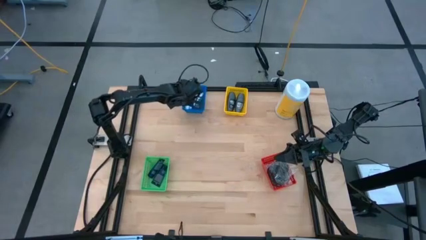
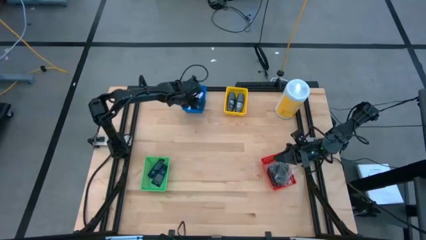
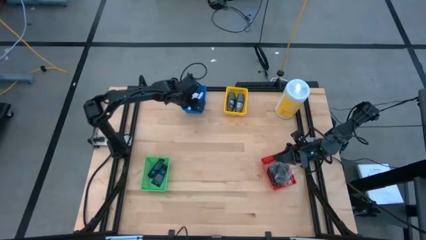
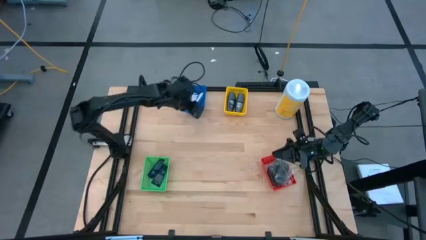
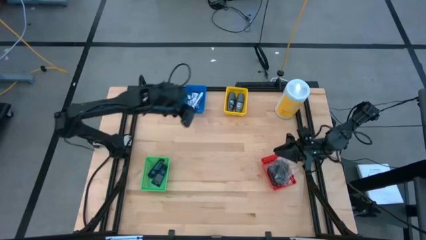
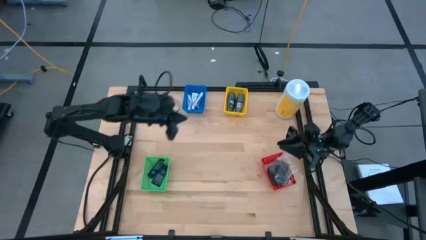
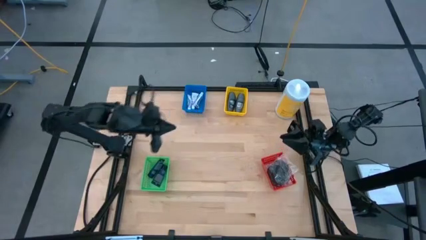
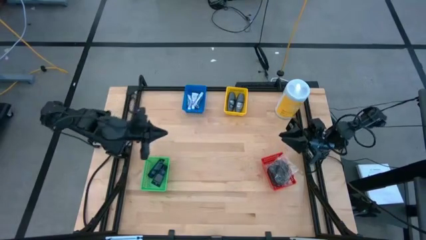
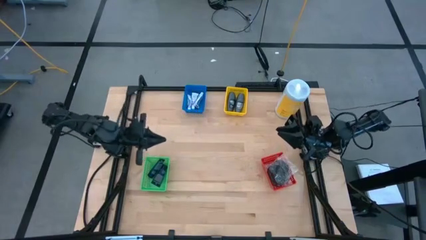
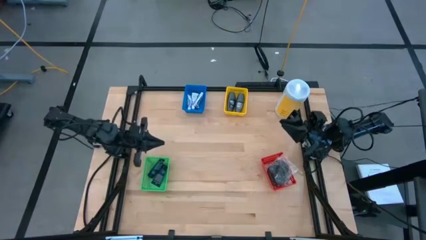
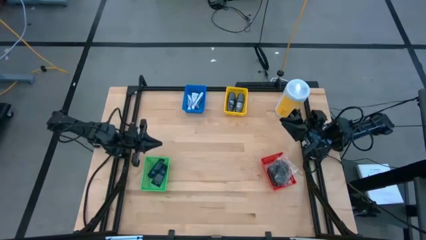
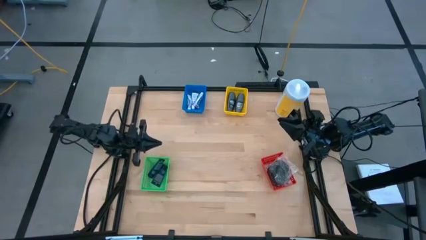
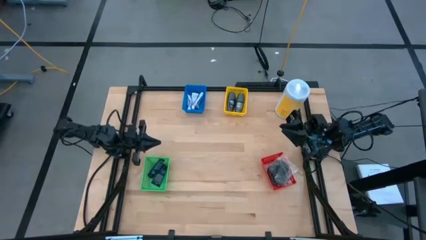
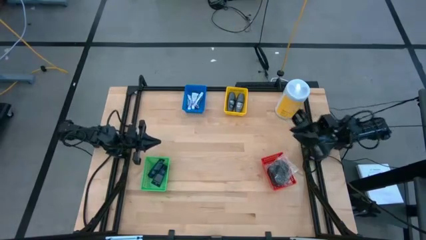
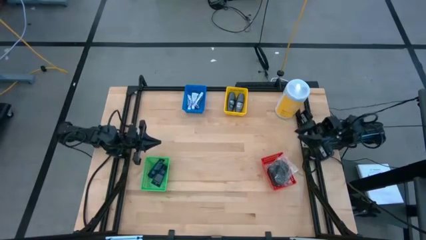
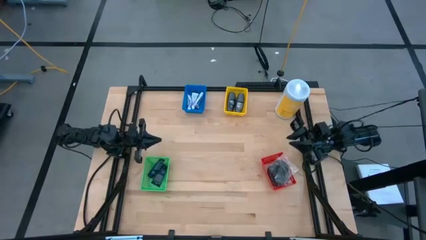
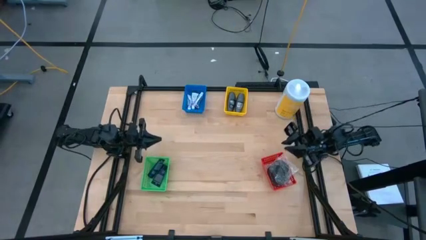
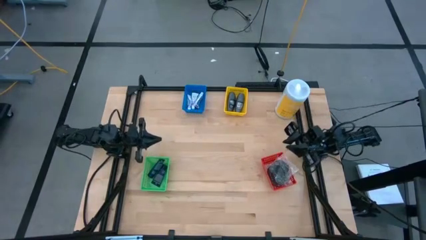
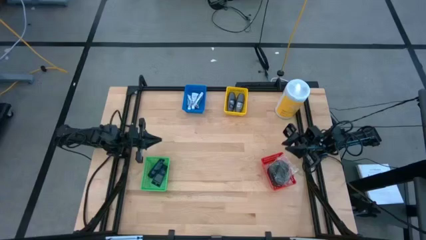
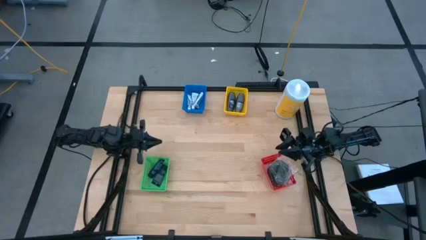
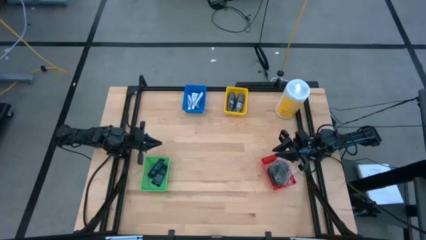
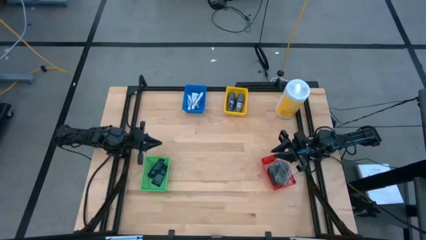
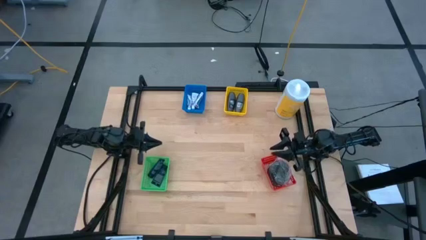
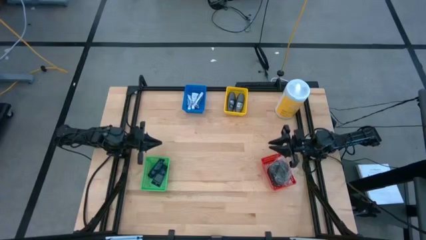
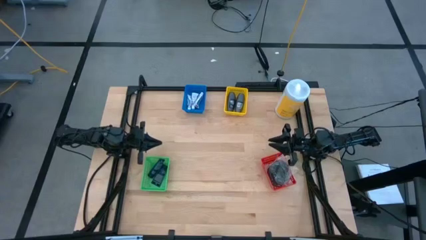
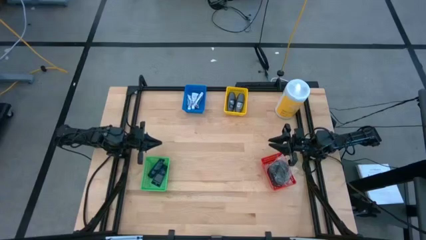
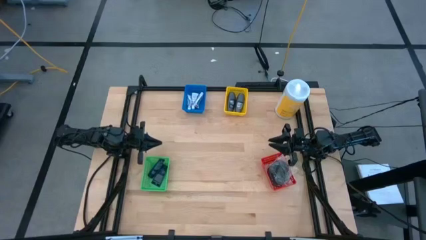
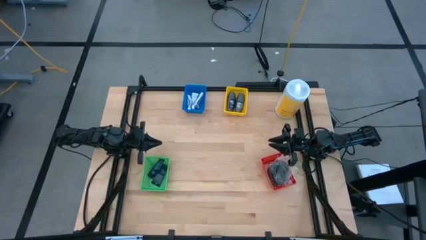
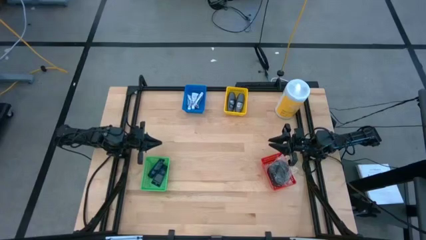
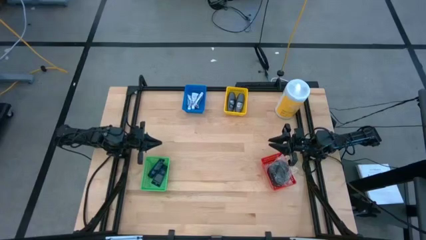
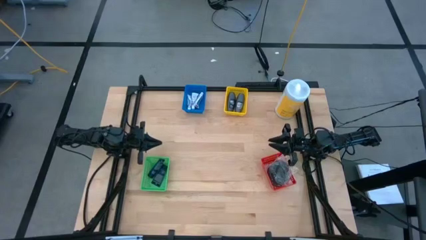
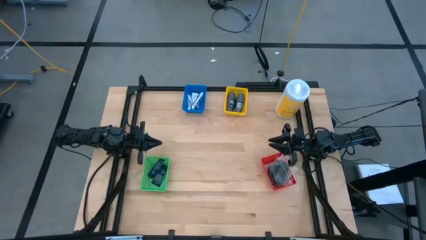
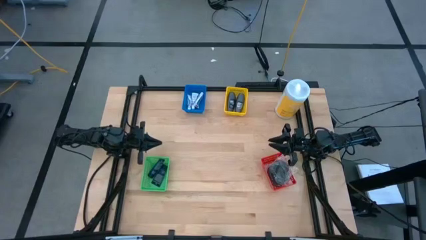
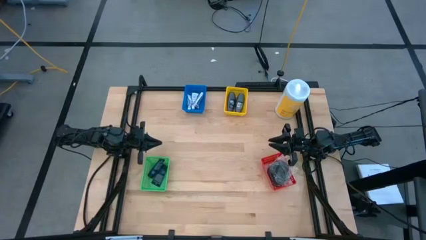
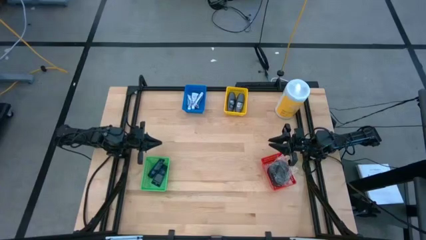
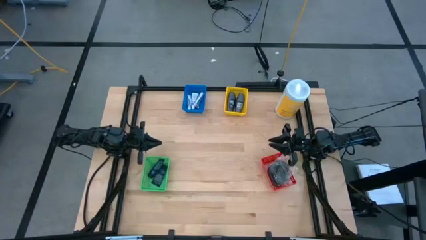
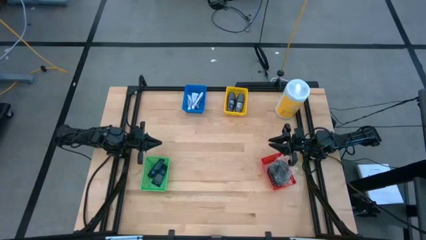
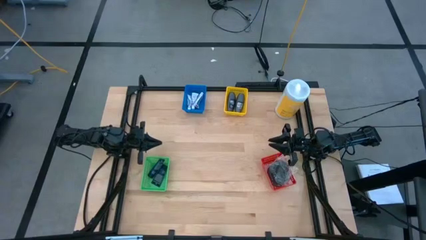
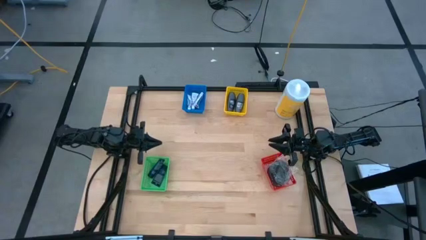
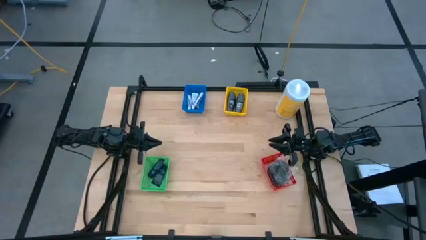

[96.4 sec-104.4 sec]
Task: Pick & Place Travel size toiletries
Return to Home Position

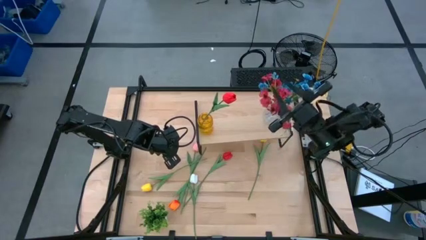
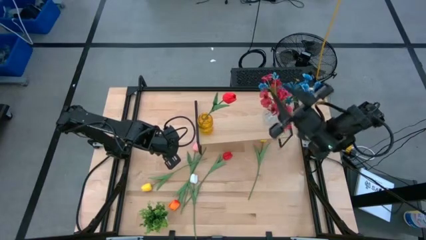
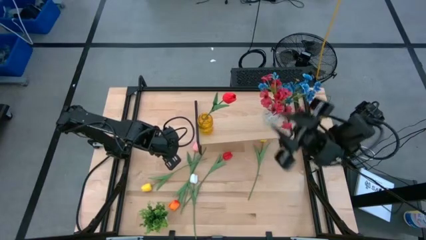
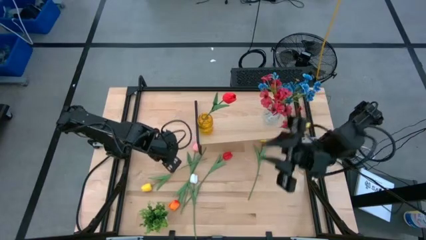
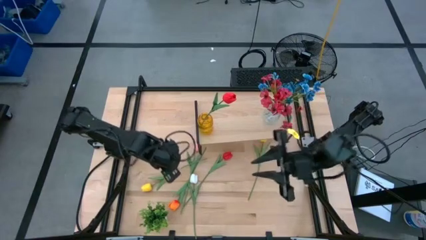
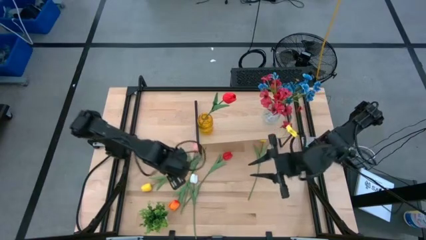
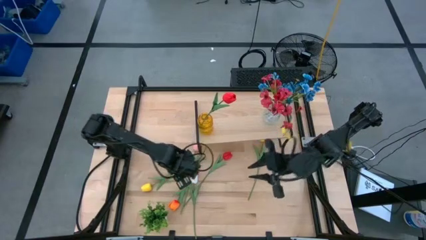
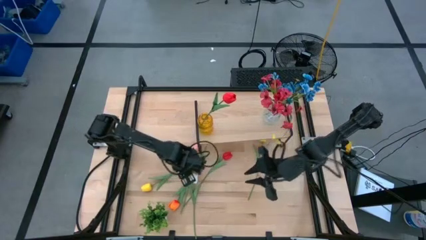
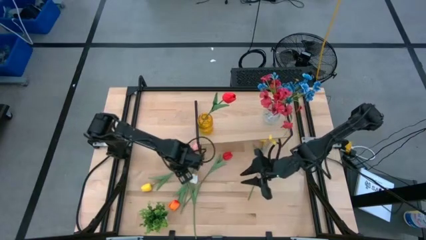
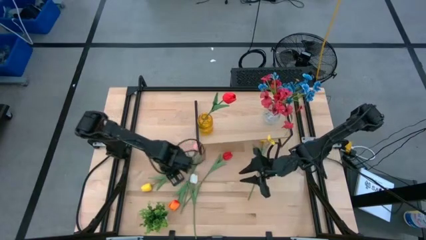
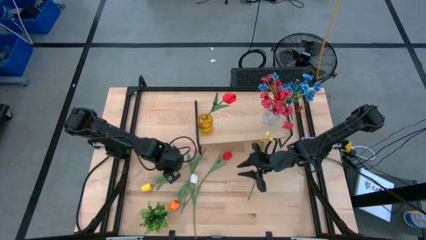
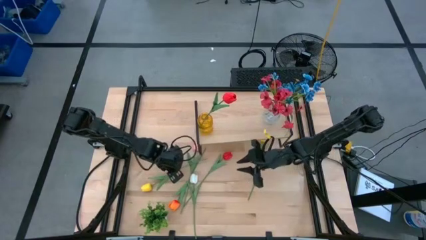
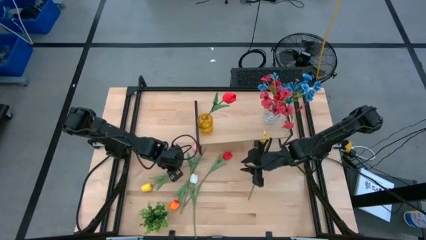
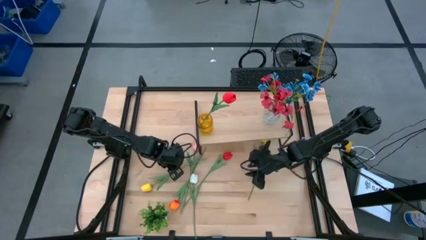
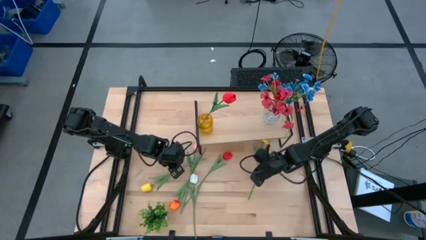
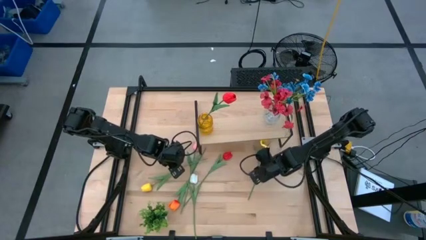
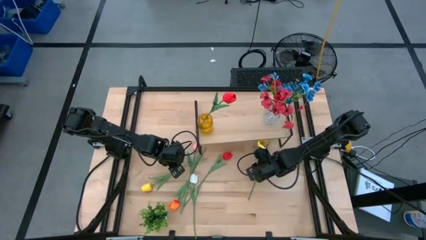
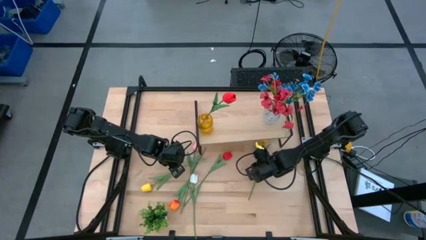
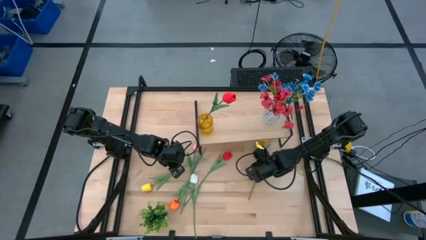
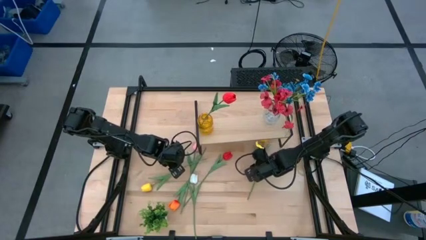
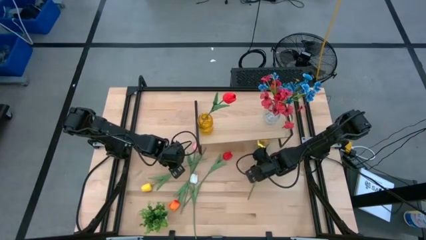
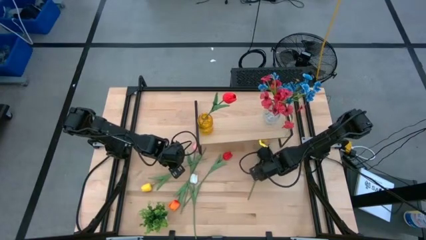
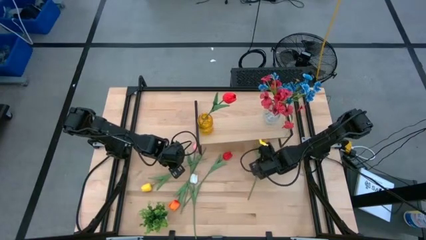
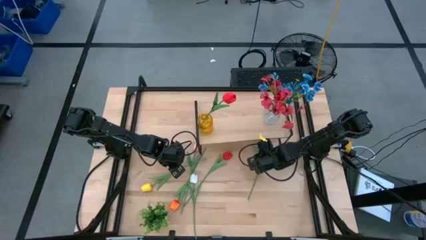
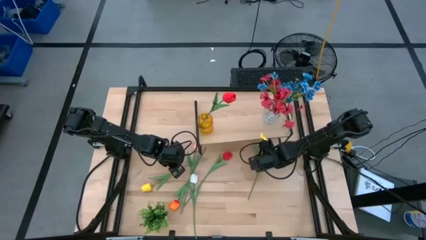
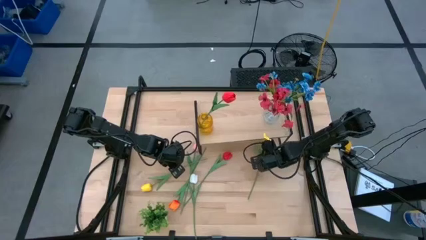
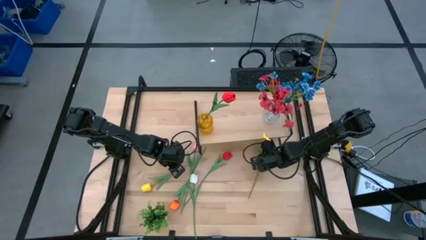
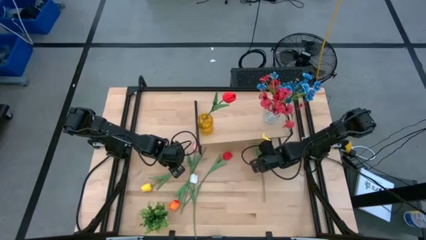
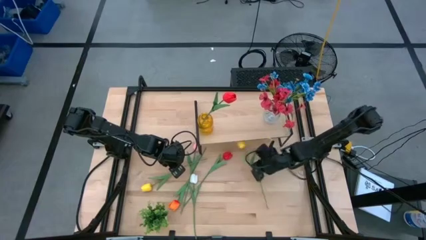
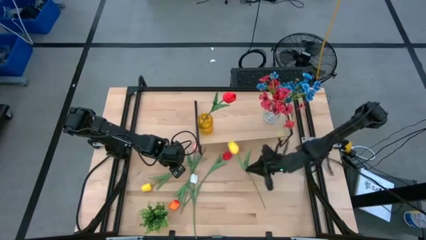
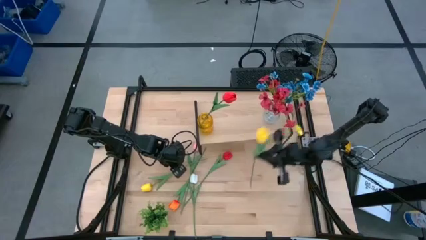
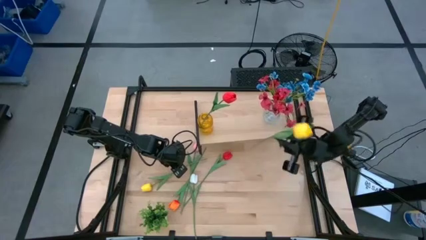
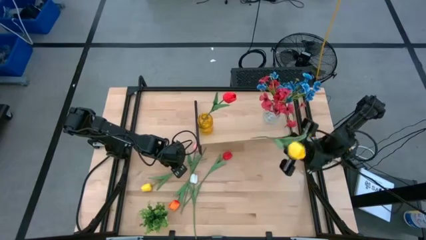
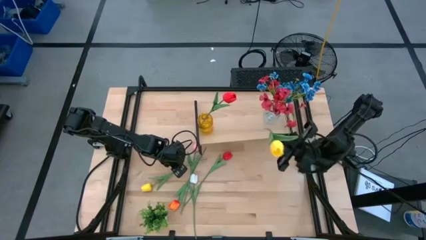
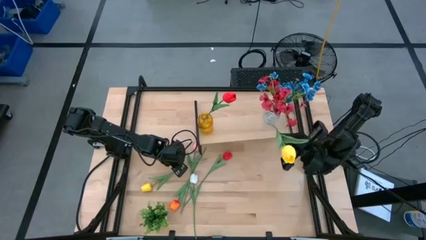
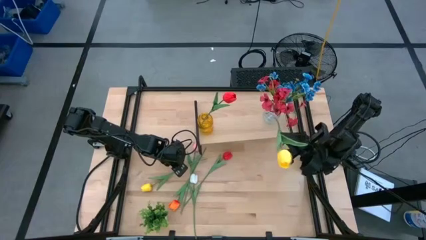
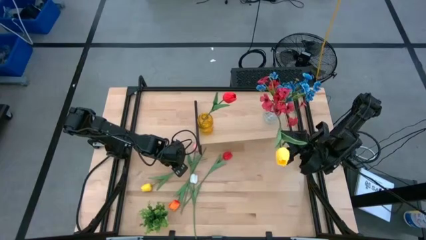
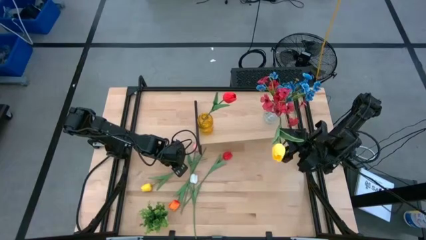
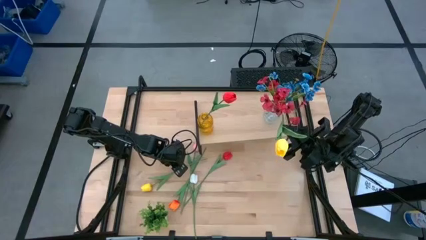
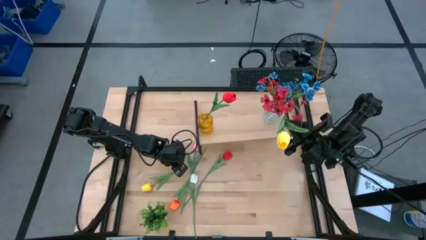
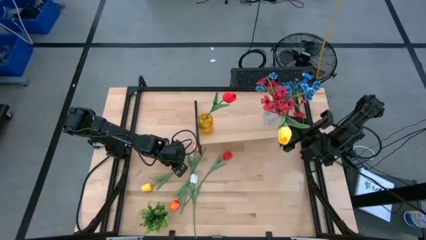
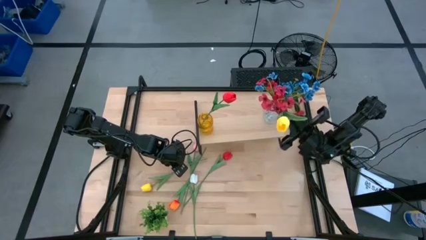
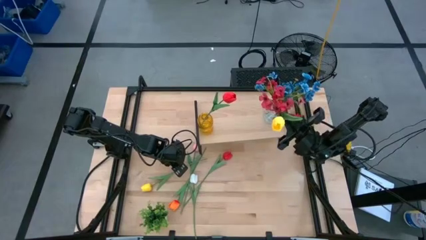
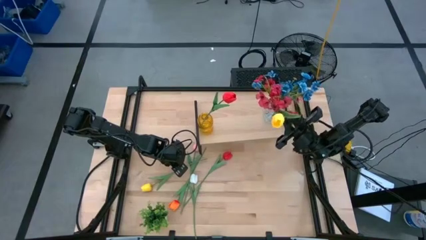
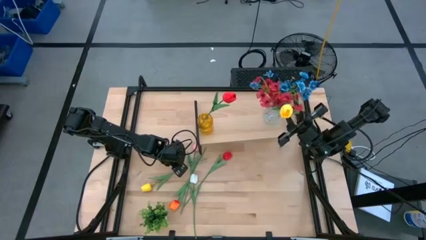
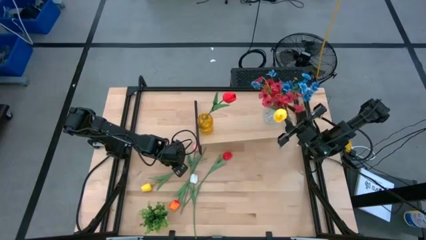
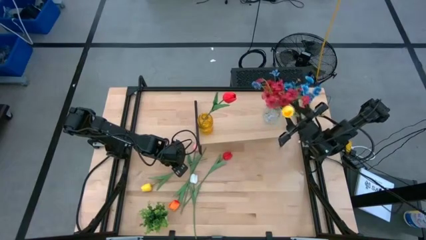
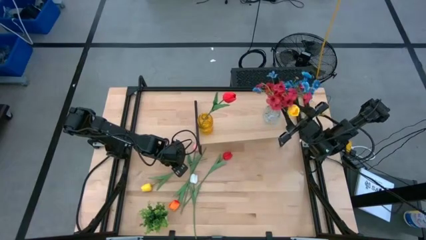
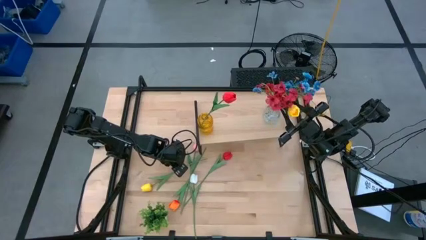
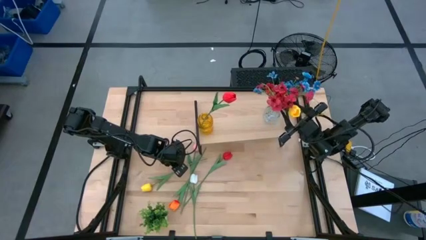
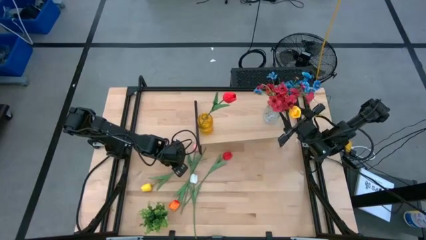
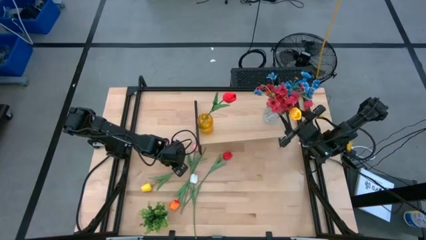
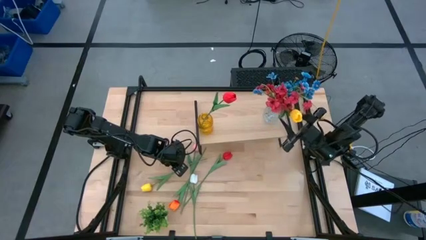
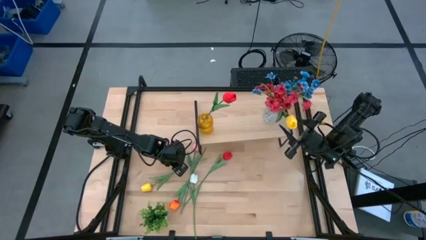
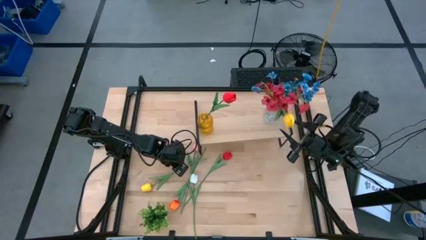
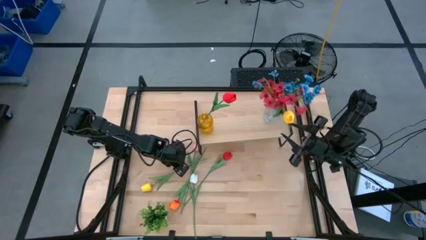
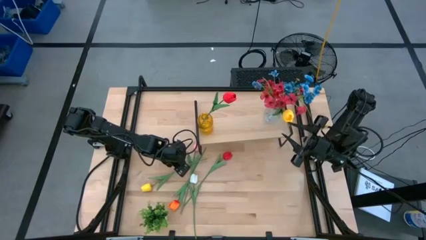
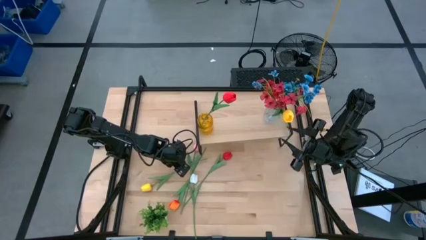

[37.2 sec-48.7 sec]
Task: Pick and place flowers into a vace then onto a shelf
Put the right yellow flower into the transparent vase
